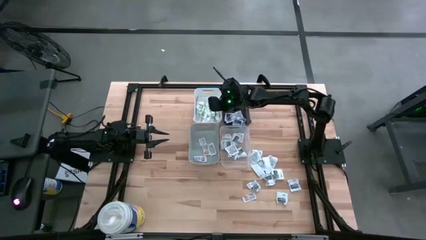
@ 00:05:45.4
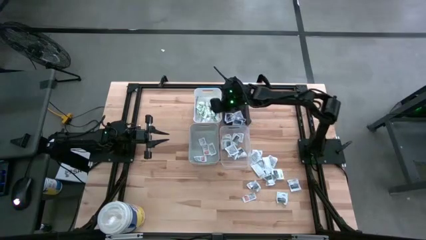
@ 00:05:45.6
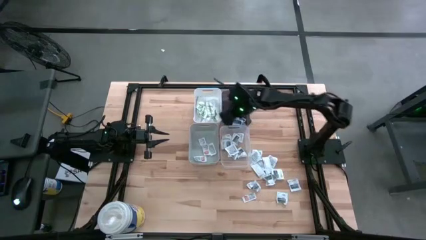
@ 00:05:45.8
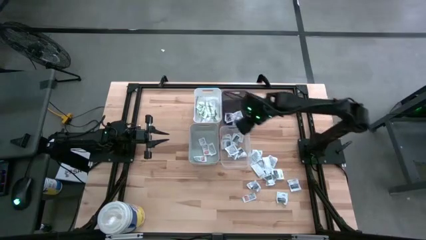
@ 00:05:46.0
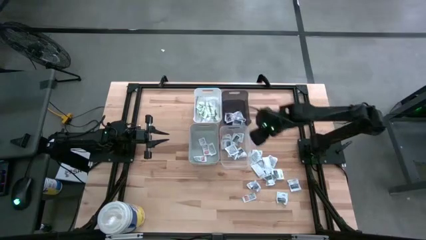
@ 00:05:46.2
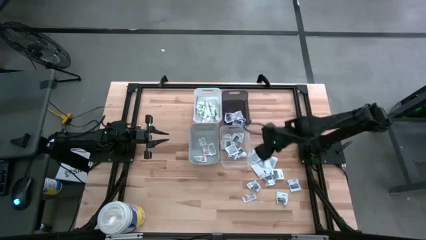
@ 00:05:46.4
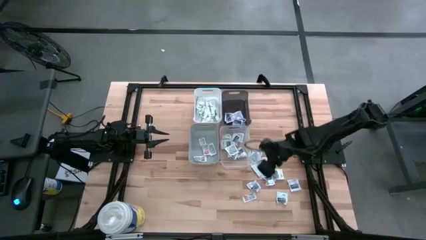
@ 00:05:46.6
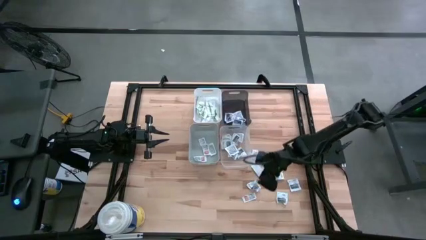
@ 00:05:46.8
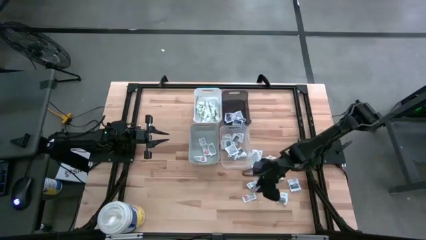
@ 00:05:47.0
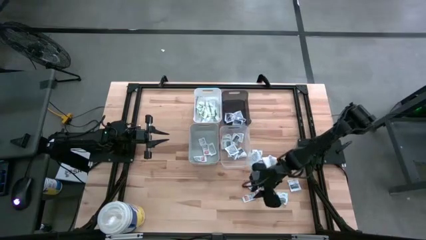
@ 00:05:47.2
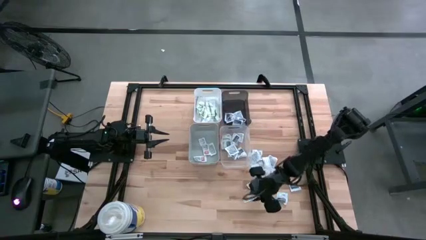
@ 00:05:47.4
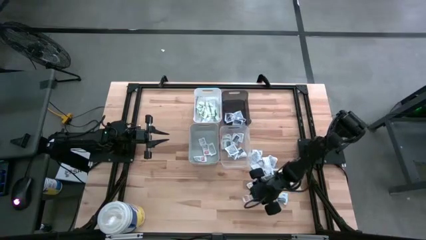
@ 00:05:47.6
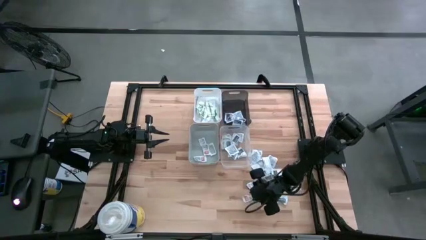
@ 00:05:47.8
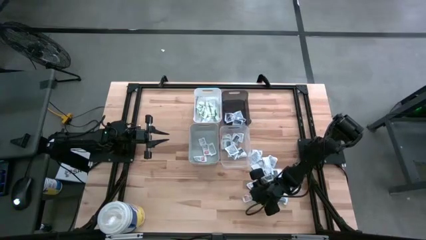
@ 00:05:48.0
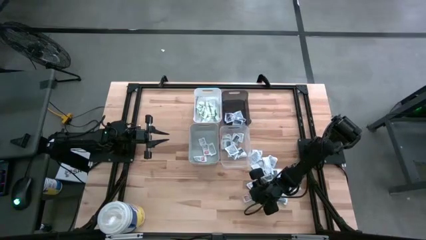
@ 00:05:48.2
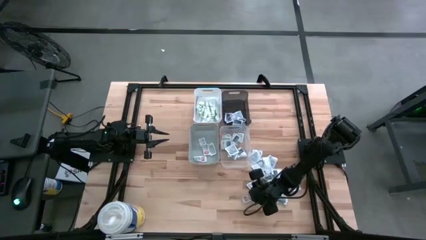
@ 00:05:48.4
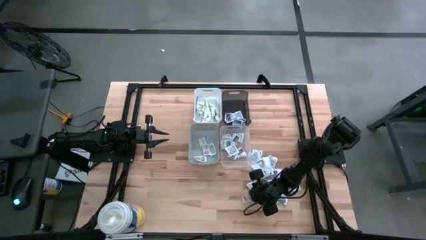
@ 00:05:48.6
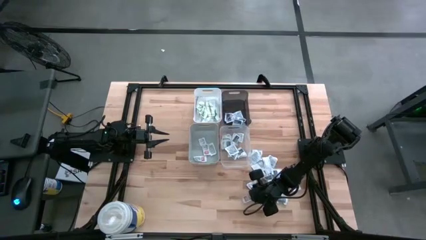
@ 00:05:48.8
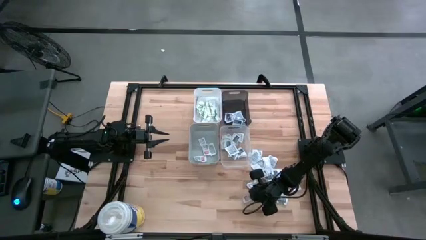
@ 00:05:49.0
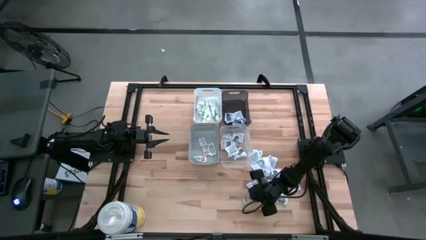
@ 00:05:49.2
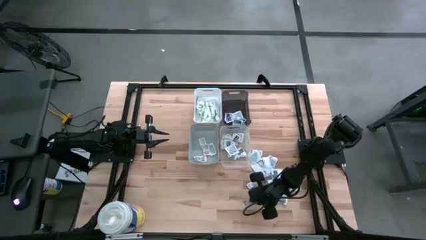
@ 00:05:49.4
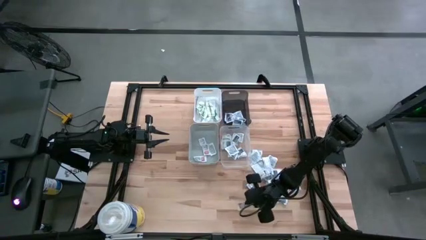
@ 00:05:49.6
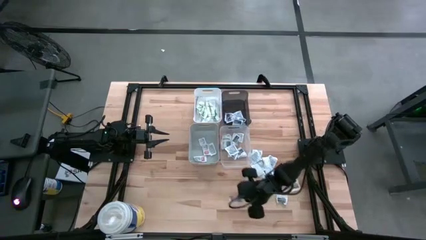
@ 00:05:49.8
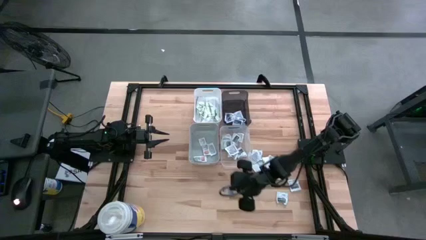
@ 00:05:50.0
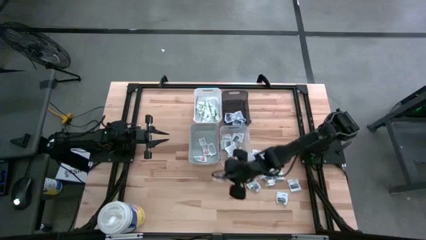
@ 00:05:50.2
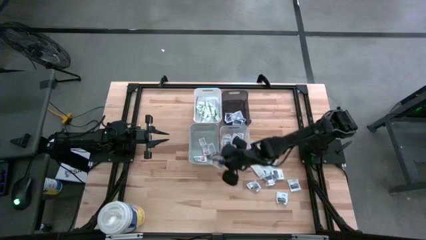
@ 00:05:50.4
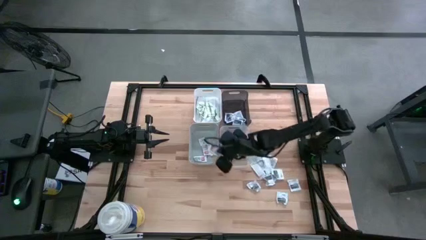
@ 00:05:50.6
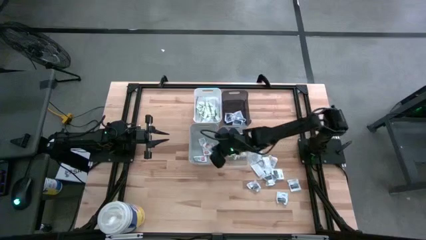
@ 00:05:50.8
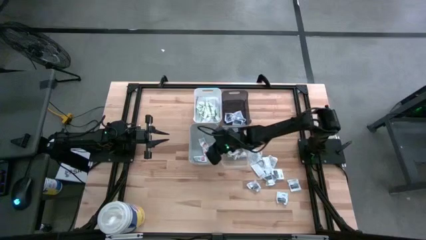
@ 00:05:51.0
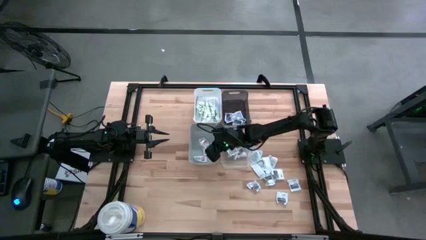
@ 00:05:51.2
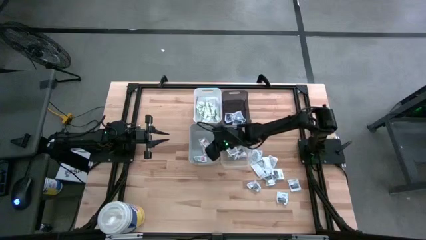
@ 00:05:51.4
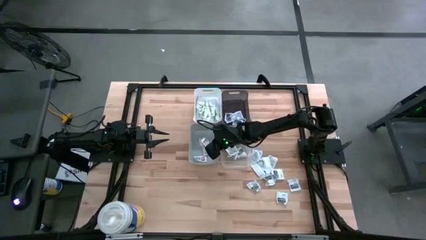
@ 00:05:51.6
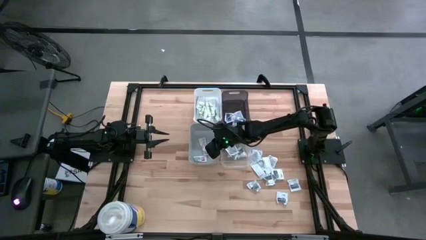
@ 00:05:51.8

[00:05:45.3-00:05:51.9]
Task: Pick & Place First Aid Supplies
Put the orange ointment pack into the gray bin

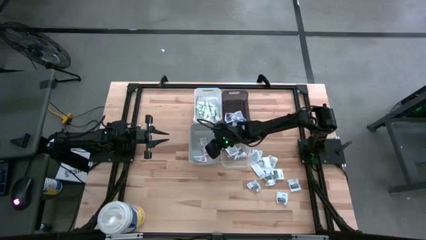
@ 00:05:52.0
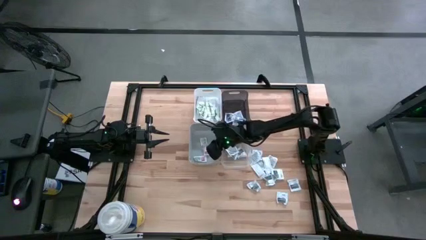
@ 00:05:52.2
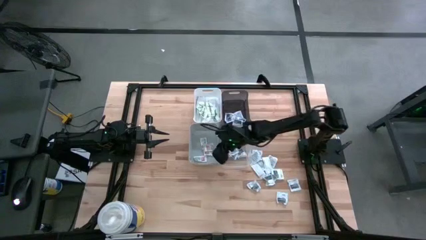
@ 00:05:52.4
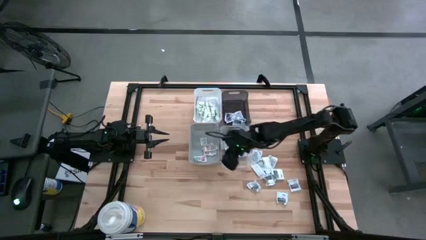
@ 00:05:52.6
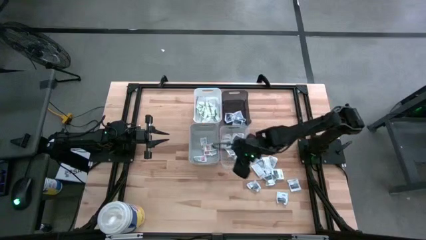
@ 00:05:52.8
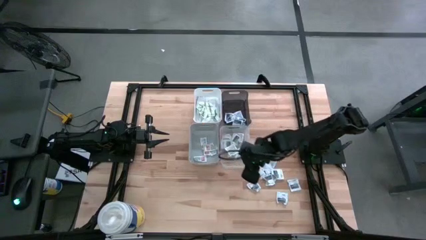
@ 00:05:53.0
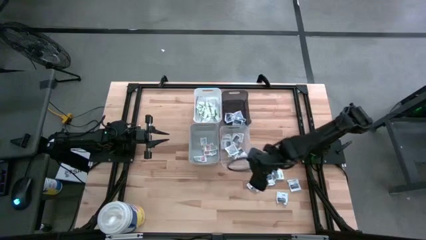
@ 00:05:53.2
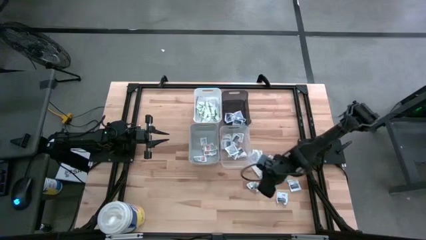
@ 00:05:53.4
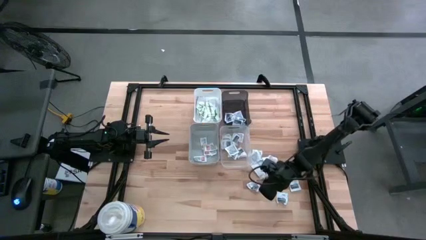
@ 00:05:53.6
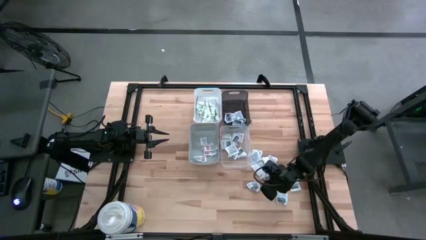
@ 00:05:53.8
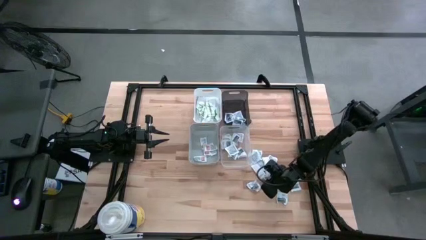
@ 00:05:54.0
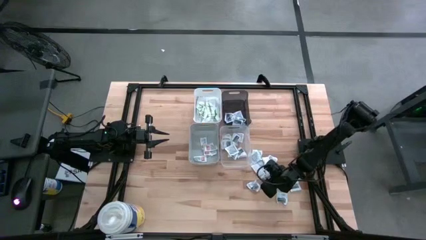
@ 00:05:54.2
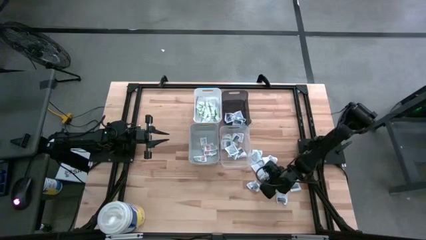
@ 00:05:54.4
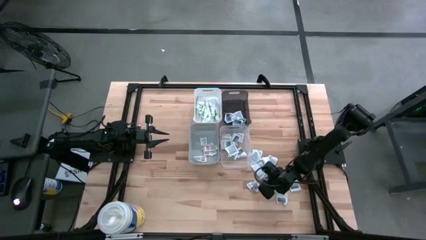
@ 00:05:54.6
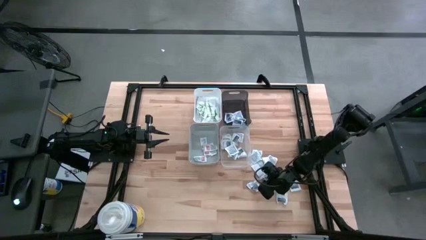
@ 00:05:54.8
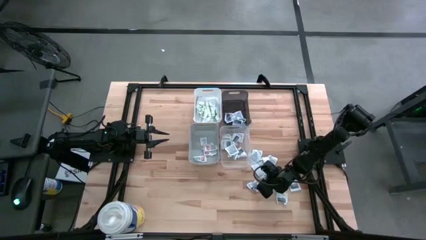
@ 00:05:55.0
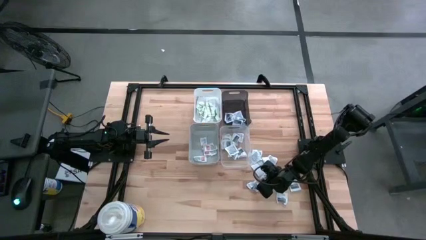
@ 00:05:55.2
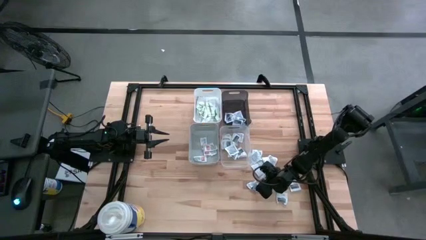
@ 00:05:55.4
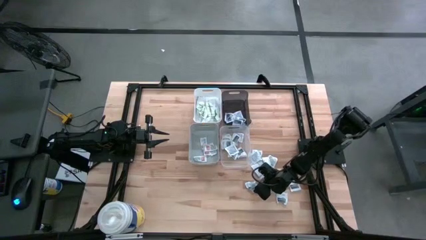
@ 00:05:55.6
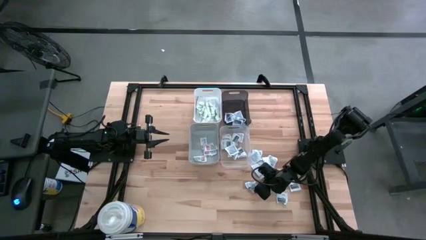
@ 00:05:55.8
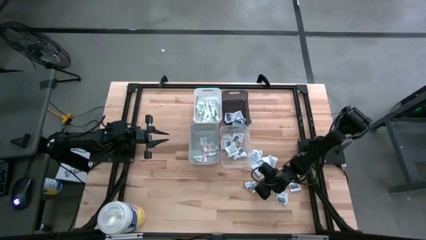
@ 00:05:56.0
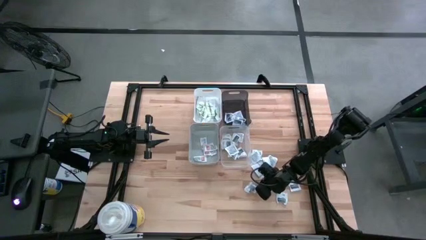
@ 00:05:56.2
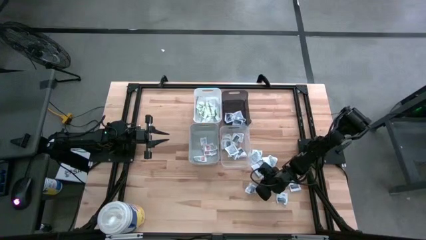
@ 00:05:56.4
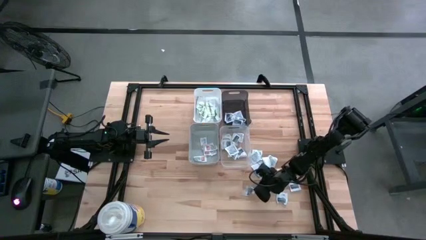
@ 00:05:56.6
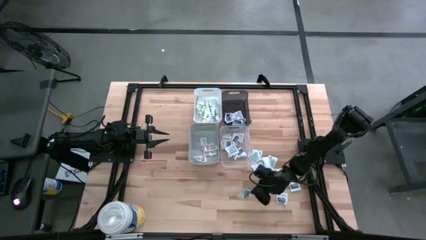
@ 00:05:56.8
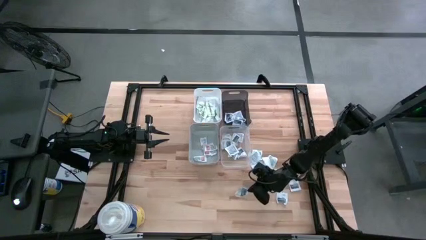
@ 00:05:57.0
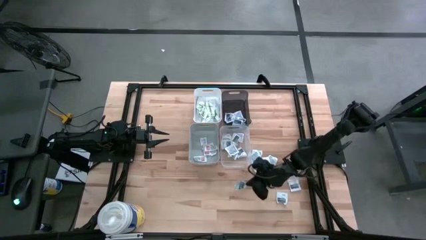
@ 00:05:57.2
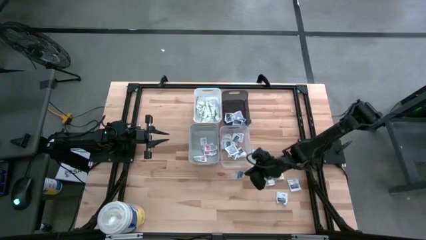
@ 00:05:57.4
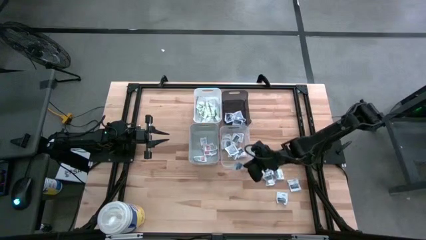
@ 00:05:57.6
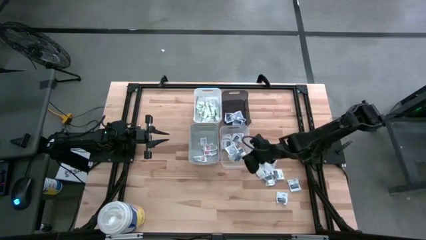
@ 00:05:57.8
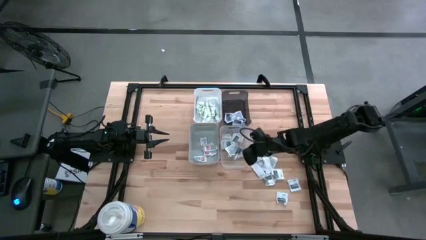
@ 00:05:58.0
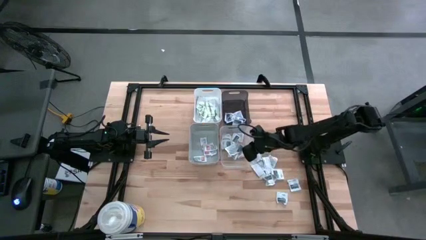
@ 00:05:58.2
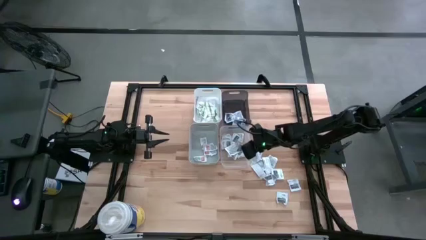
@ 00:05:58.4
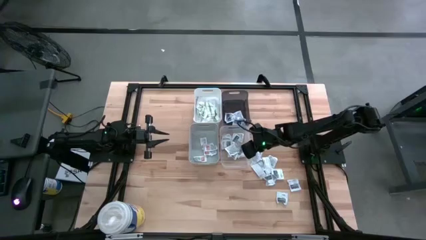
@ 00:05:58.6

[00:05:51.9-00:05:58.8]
Put the gray towelette pack into the transparent bin
